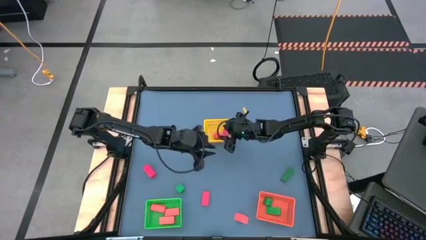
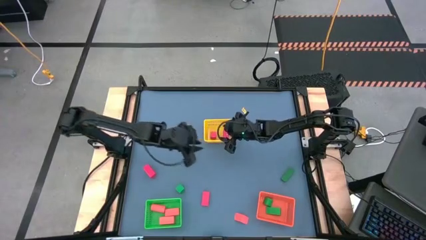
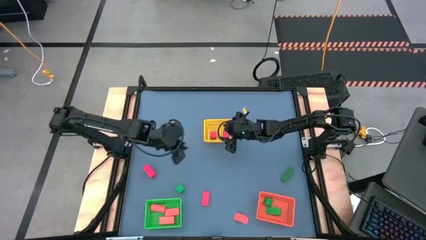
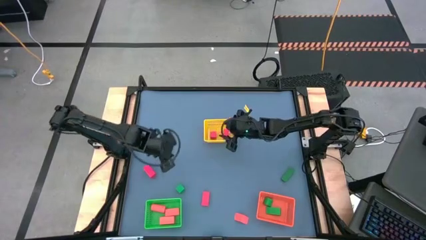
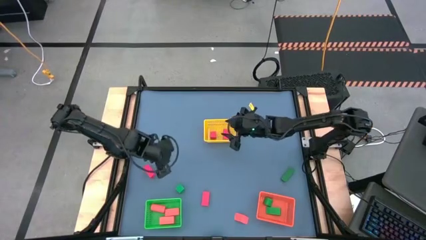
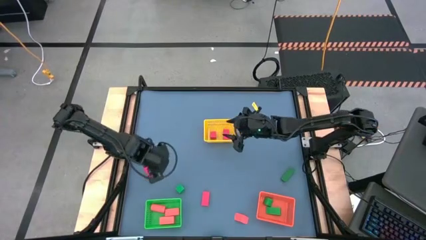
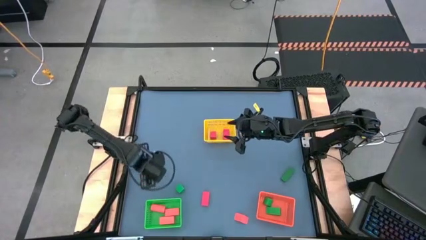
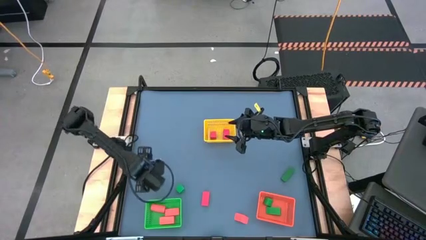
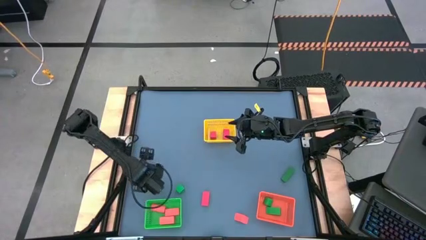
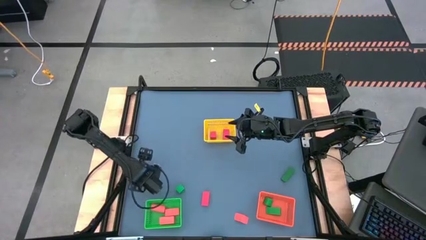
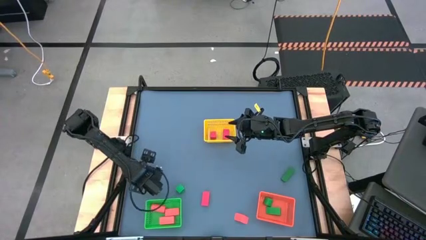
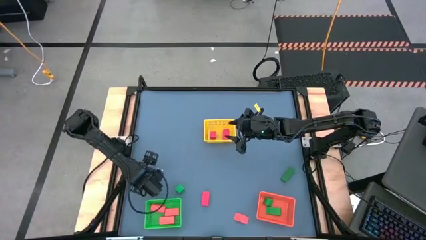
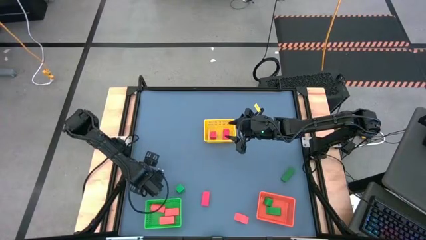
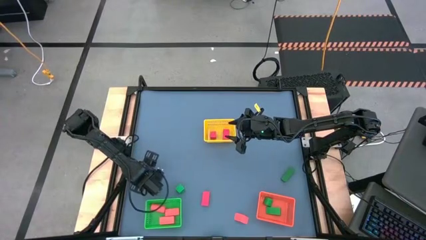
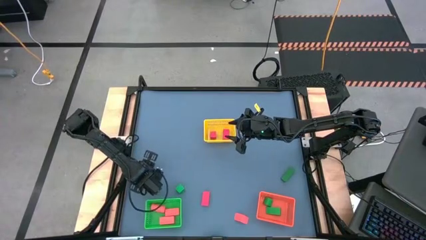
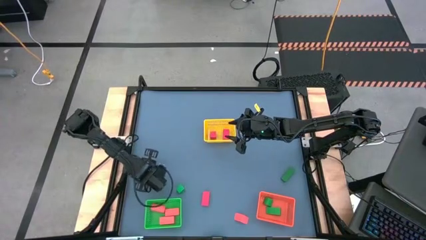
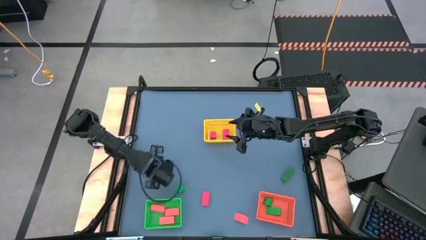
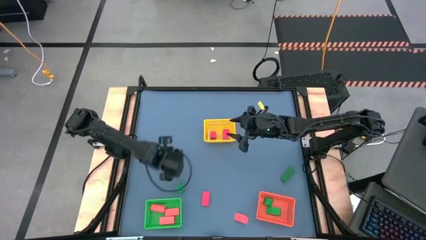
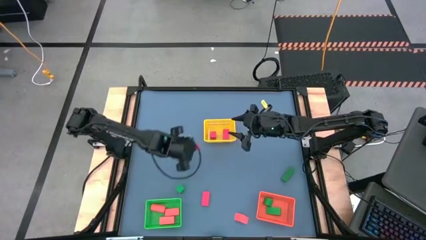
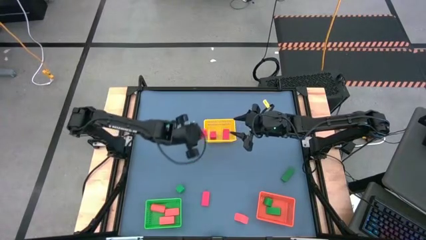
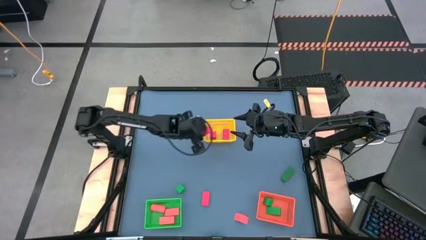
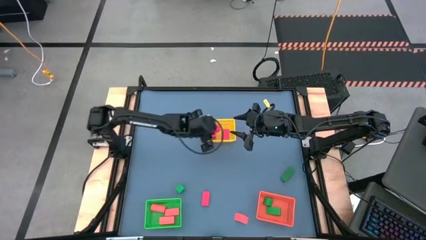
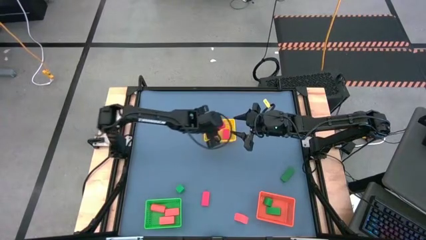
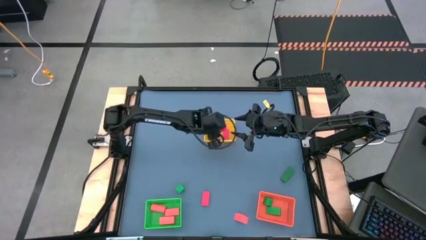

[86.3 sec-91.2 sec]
Task: Sort & place blocks by color
Put the red block into the yellow bin

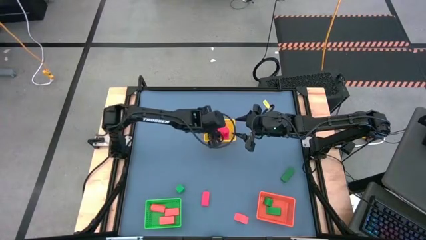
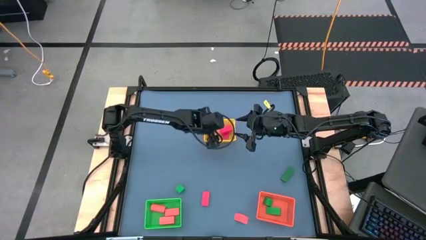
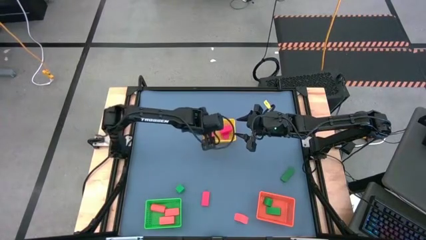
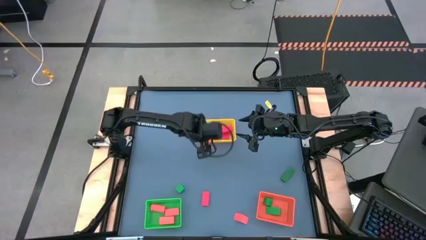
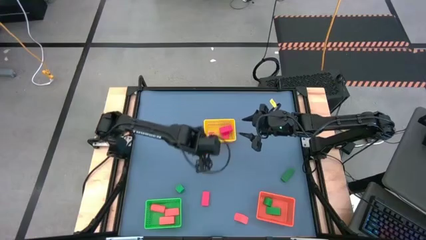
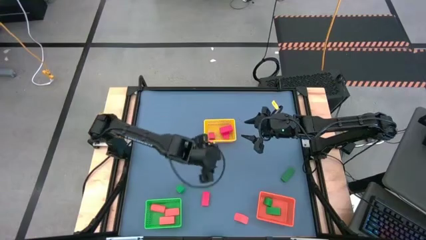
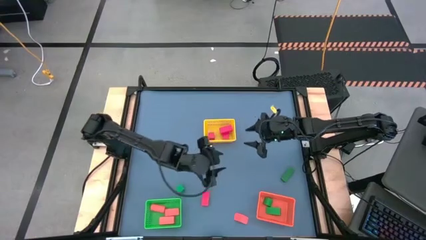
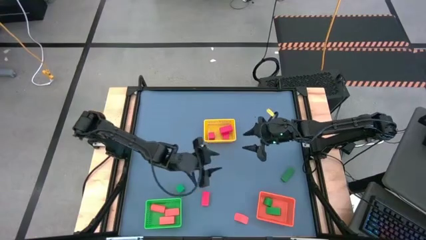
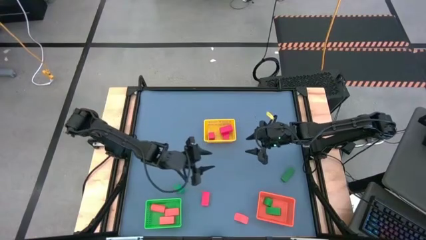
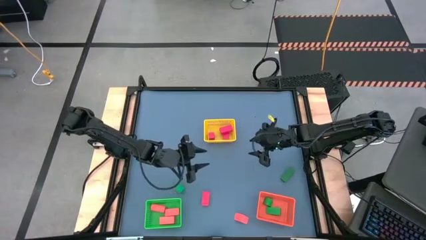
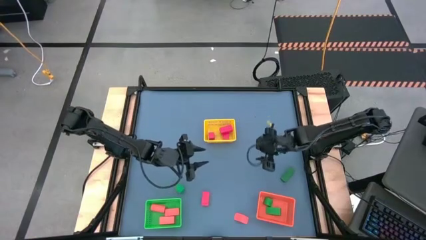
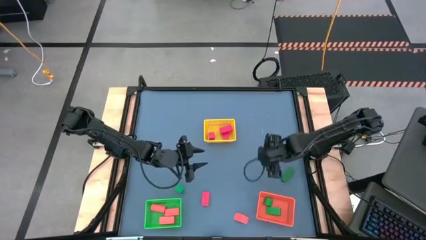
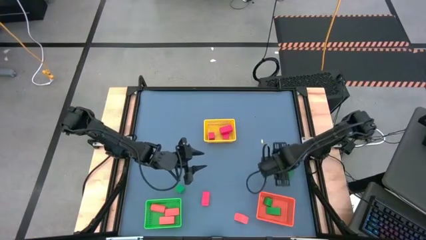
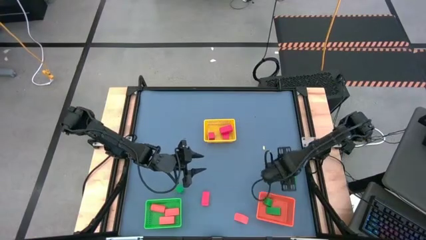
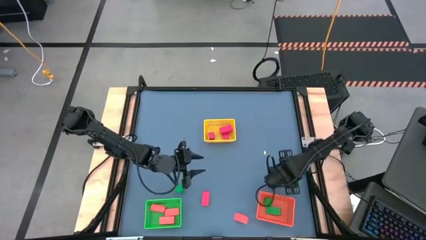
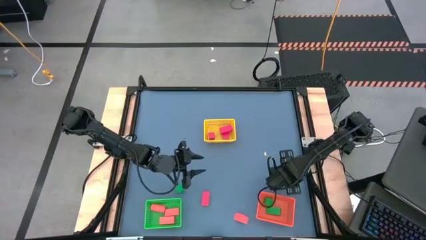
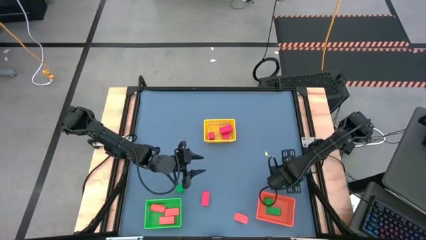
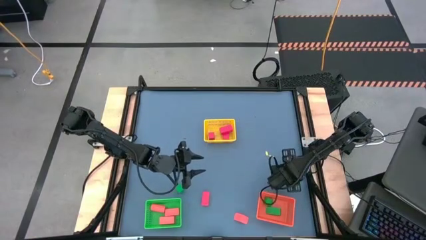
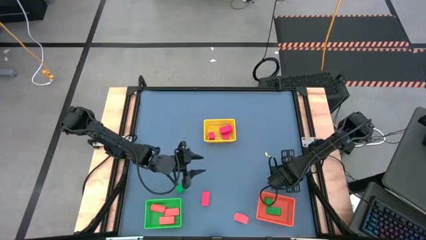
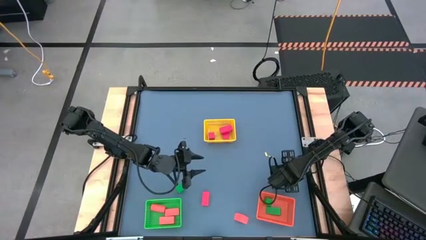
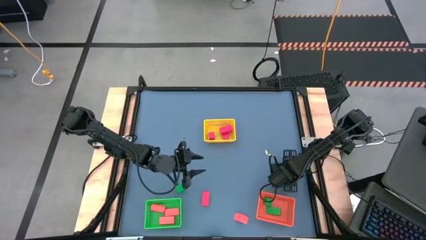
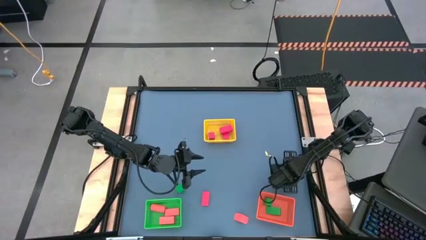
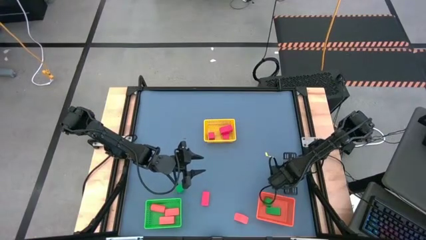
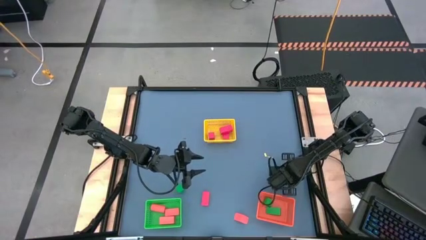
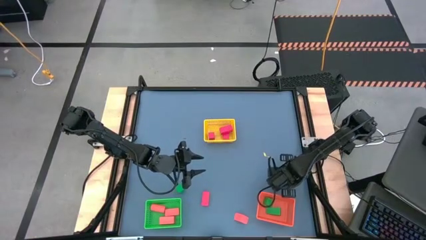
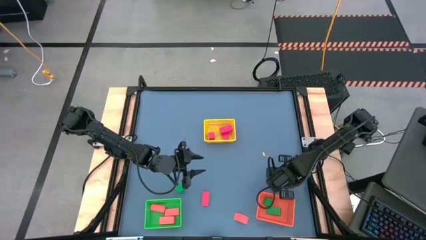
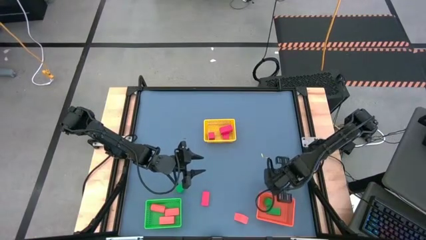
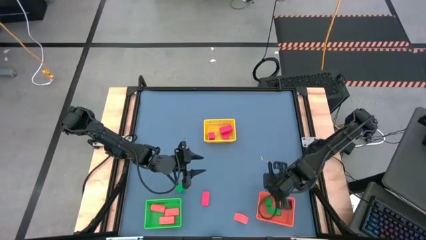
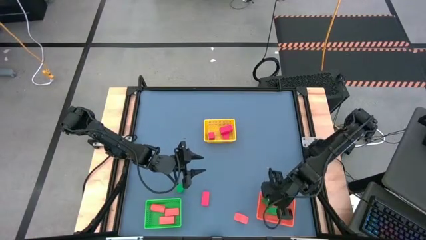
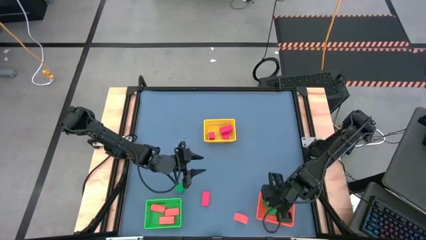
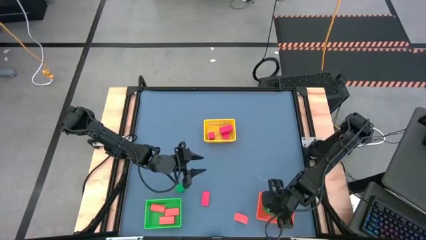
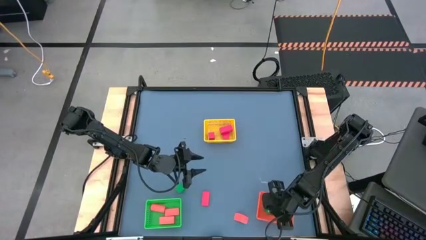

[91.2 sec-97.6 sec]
Put the green block into the orange bin

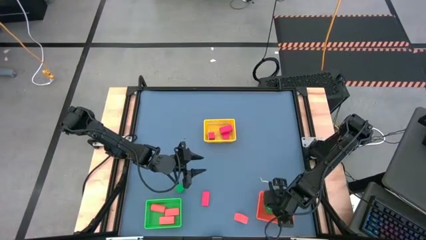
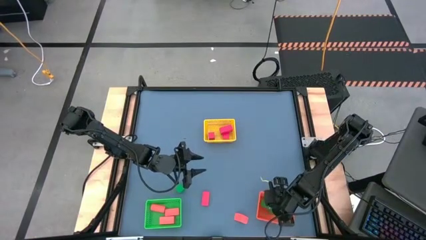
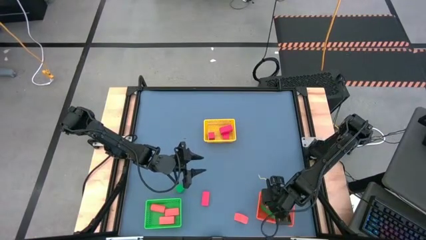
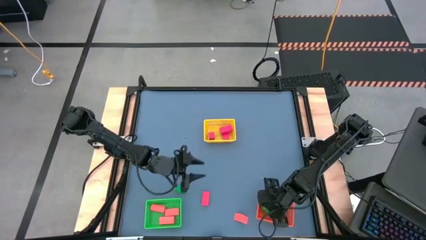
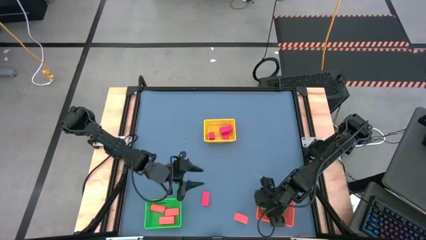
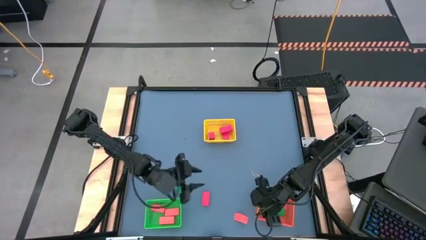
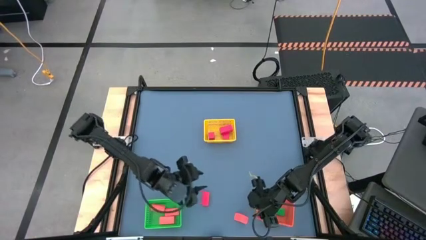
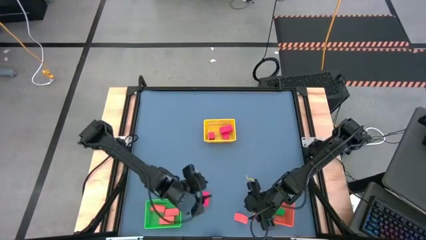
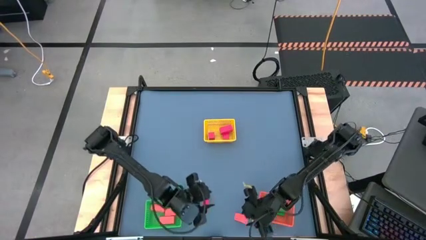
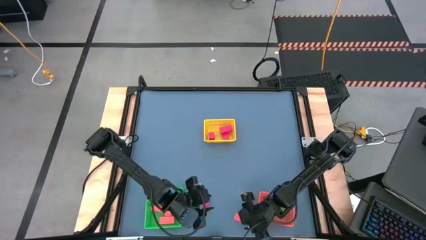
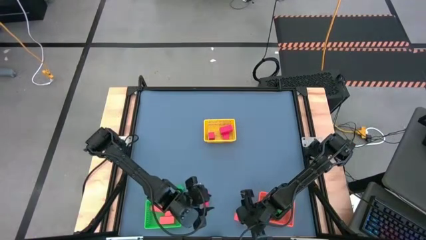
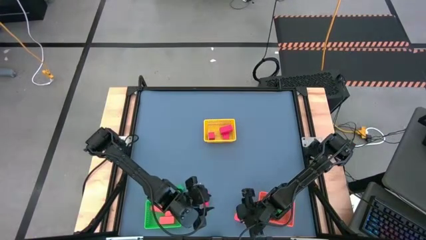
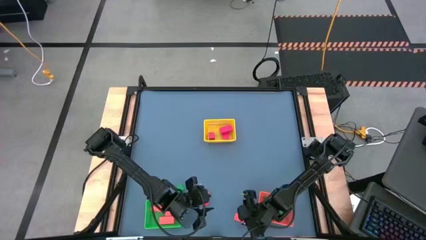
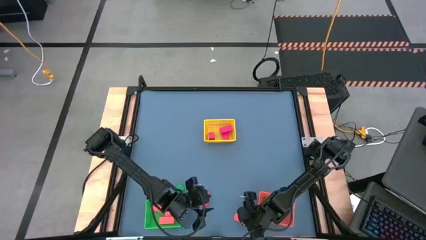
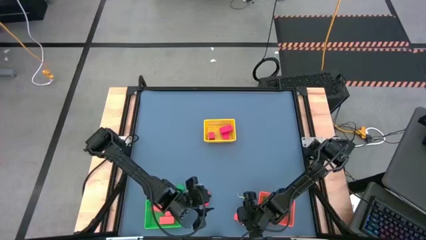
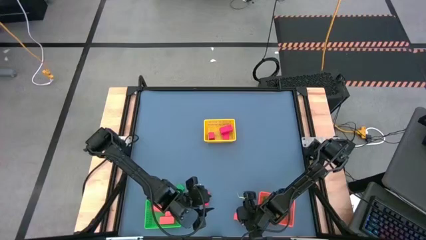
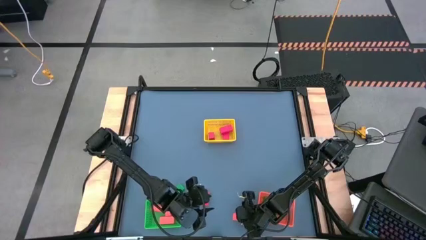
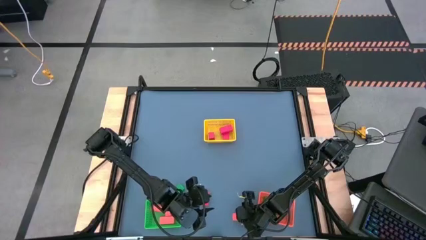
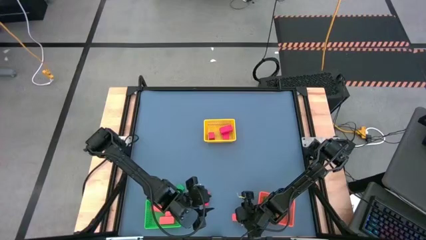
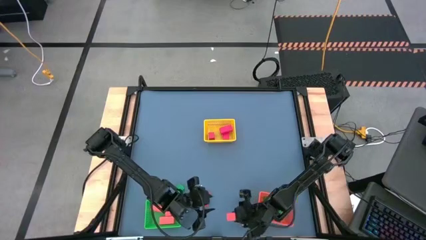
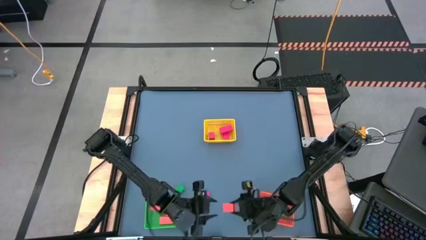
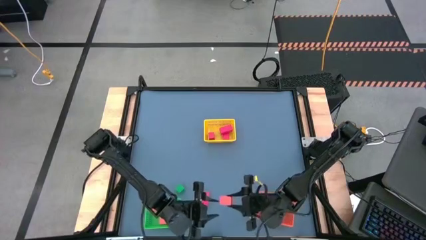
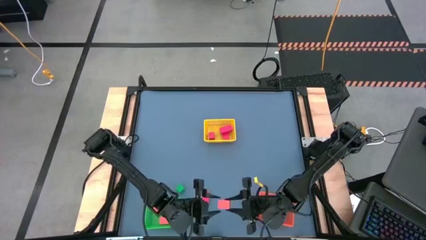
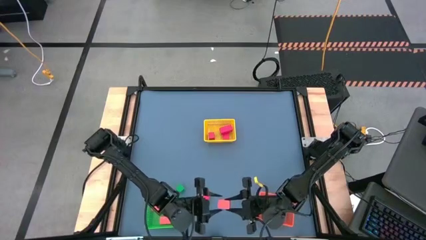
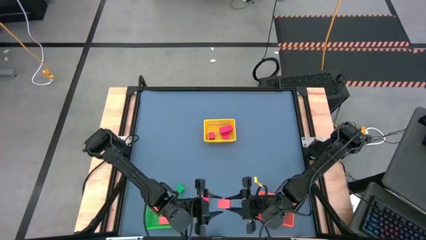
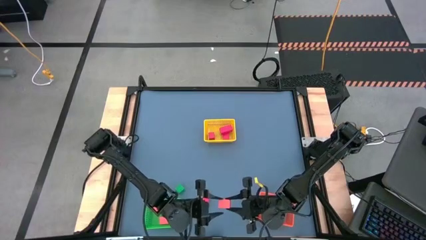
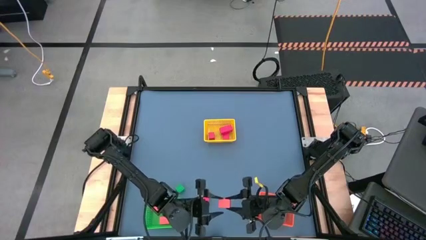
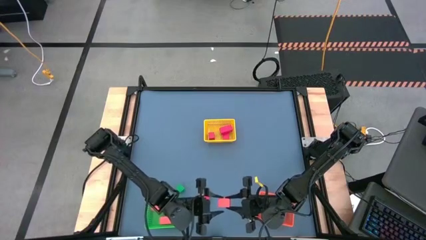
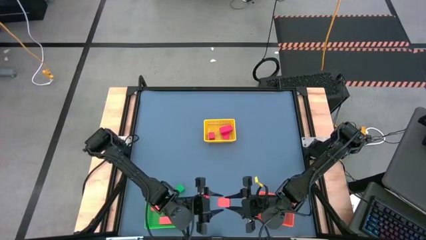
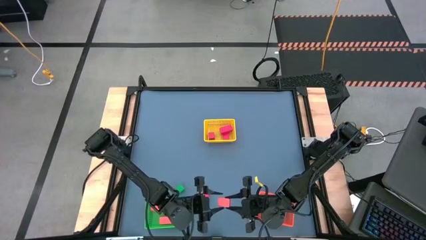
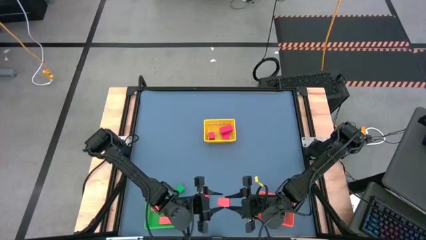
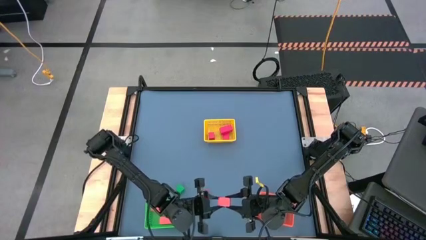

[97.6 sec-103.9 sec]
Put the orange block into the green bin
